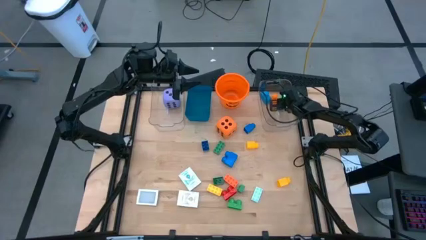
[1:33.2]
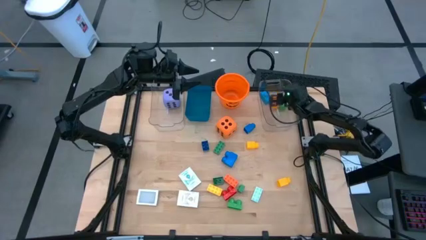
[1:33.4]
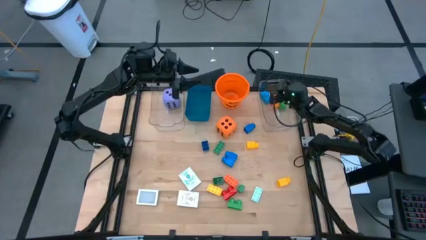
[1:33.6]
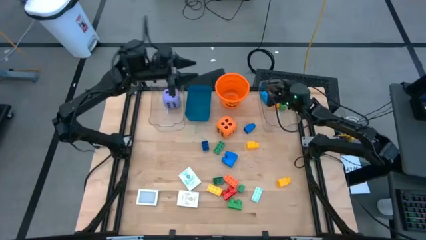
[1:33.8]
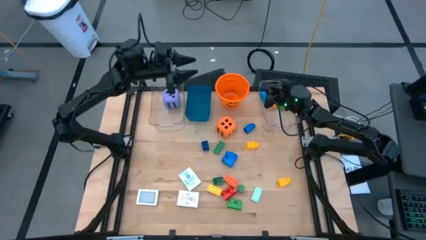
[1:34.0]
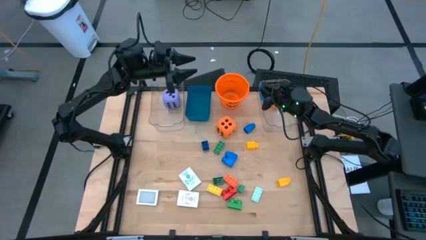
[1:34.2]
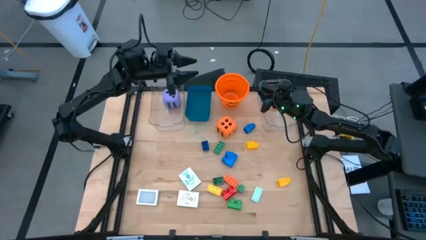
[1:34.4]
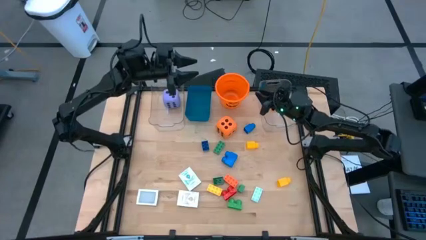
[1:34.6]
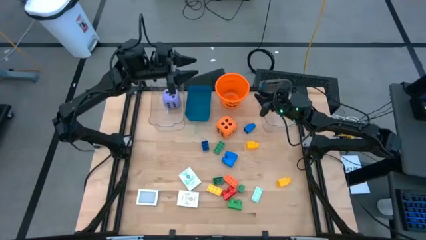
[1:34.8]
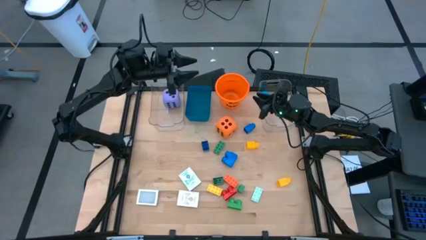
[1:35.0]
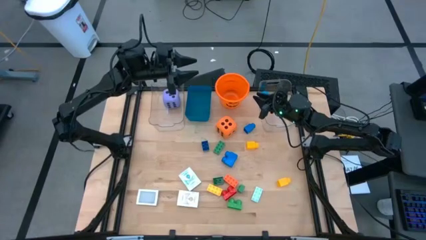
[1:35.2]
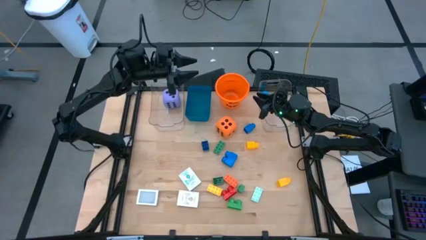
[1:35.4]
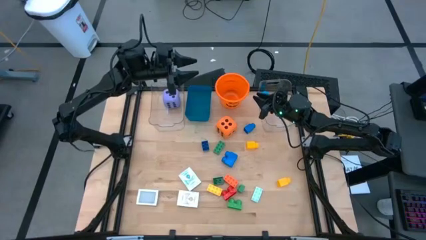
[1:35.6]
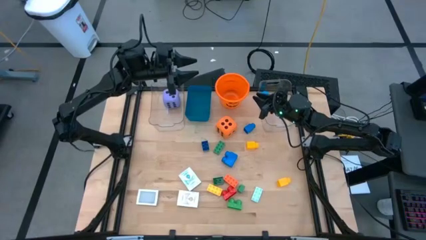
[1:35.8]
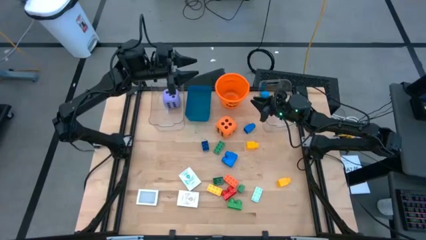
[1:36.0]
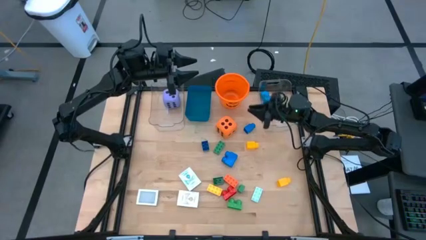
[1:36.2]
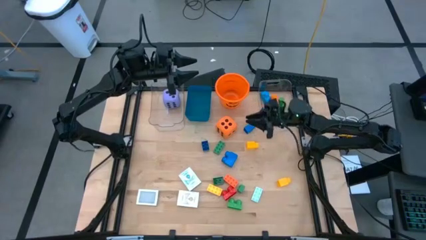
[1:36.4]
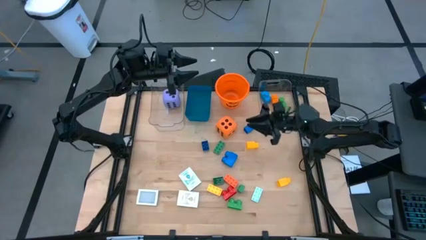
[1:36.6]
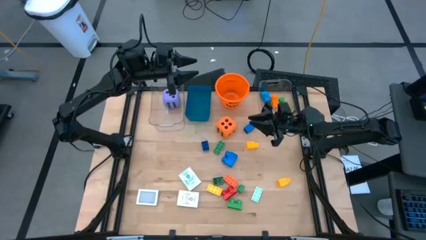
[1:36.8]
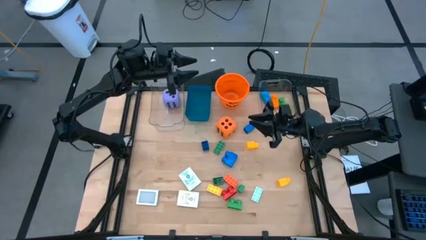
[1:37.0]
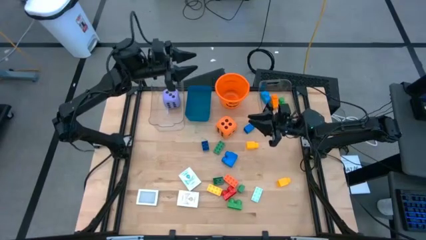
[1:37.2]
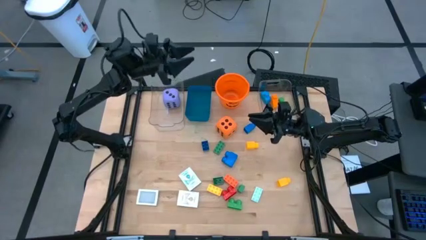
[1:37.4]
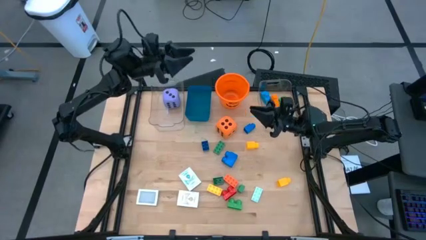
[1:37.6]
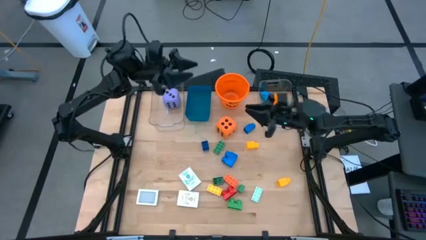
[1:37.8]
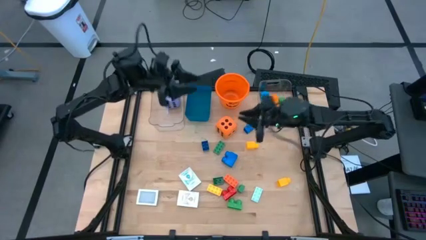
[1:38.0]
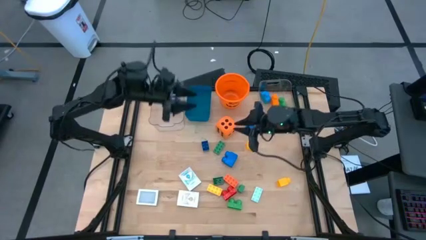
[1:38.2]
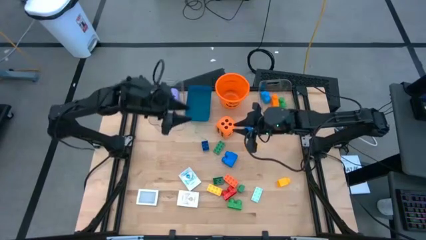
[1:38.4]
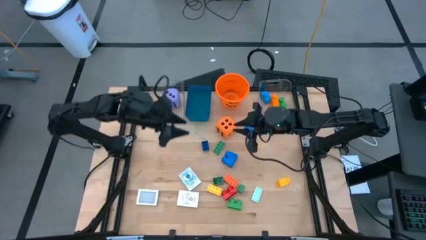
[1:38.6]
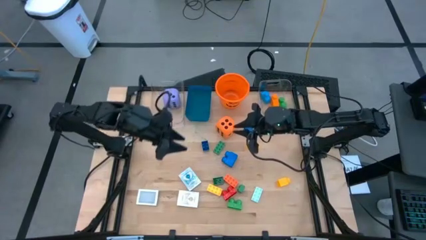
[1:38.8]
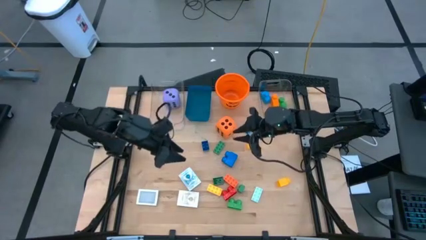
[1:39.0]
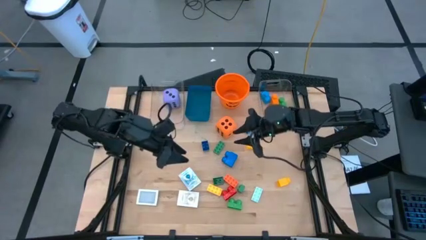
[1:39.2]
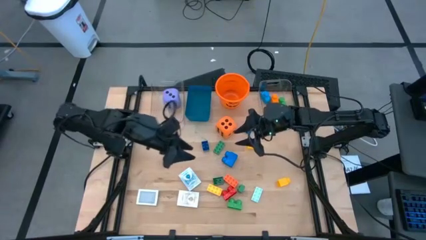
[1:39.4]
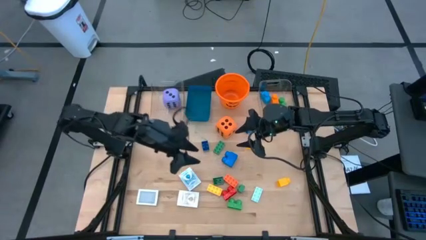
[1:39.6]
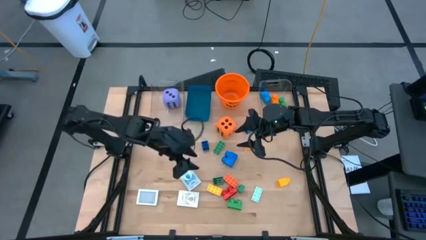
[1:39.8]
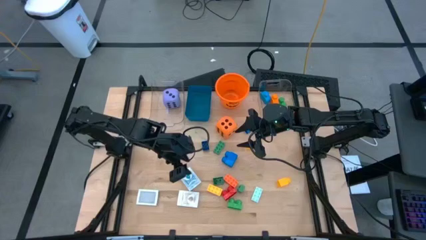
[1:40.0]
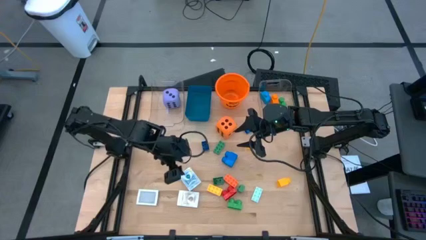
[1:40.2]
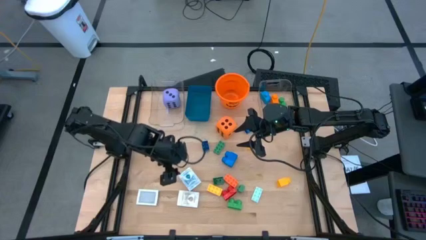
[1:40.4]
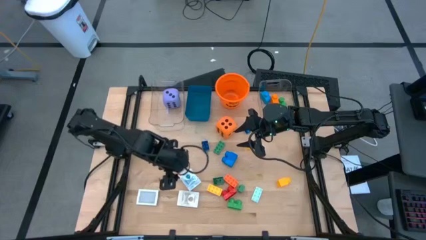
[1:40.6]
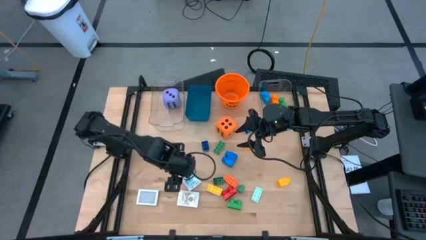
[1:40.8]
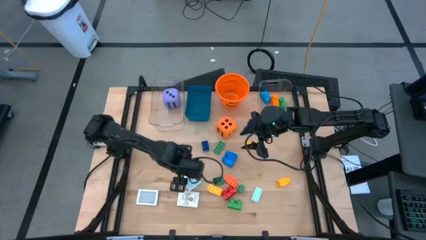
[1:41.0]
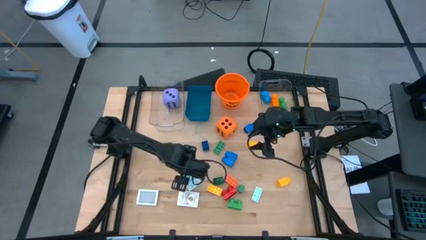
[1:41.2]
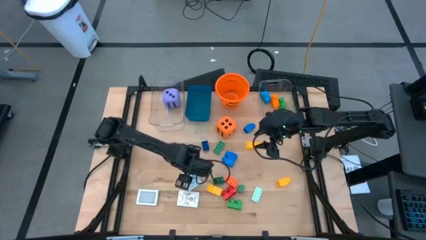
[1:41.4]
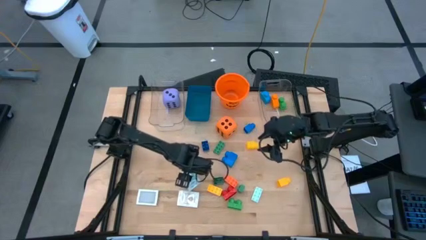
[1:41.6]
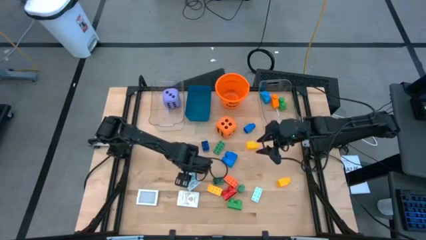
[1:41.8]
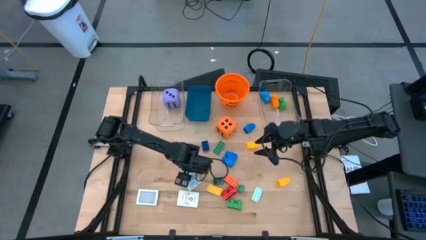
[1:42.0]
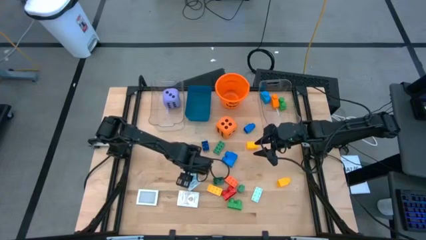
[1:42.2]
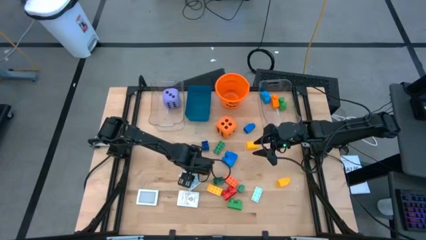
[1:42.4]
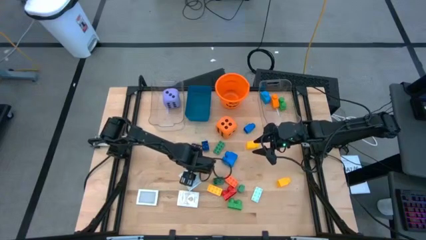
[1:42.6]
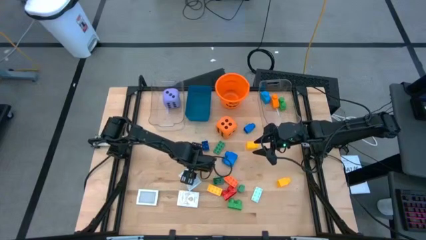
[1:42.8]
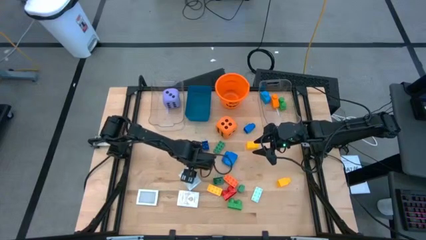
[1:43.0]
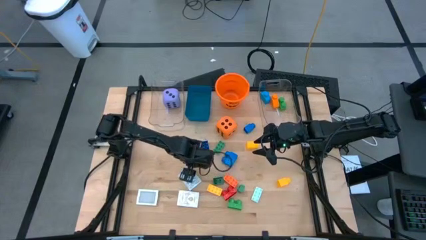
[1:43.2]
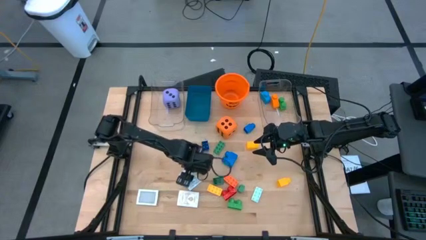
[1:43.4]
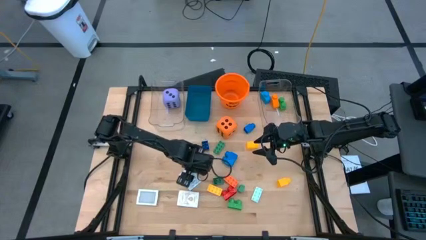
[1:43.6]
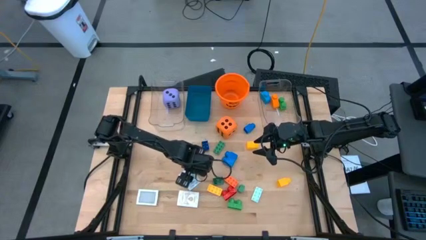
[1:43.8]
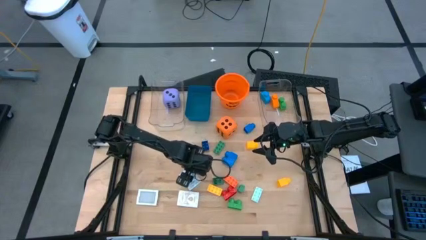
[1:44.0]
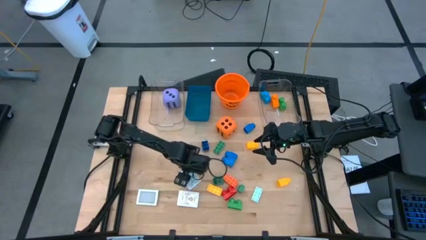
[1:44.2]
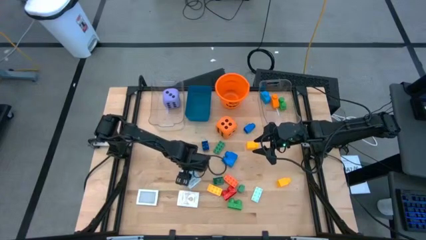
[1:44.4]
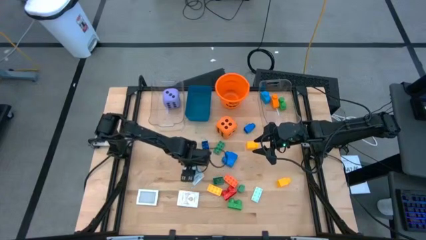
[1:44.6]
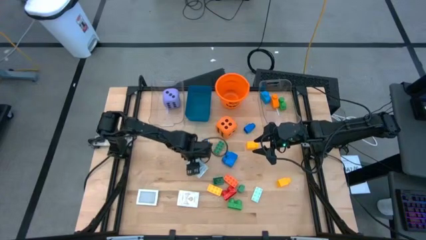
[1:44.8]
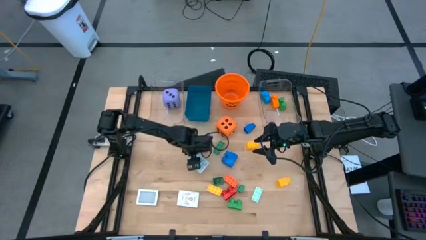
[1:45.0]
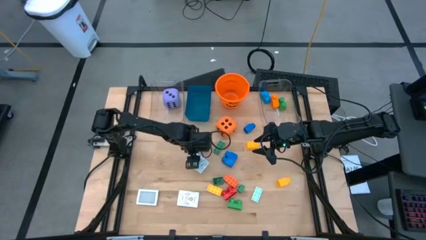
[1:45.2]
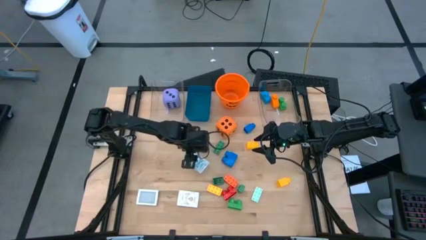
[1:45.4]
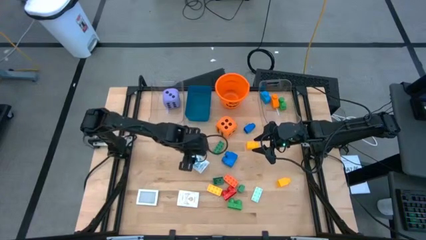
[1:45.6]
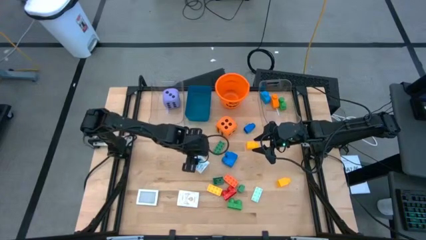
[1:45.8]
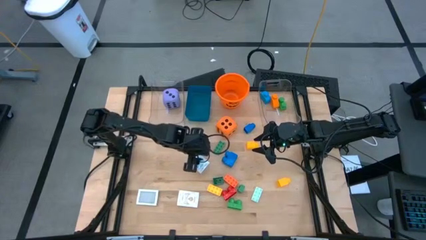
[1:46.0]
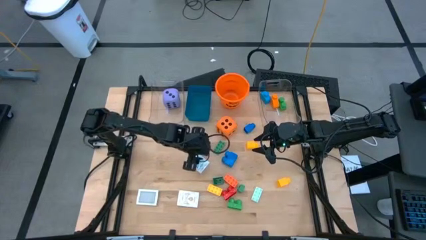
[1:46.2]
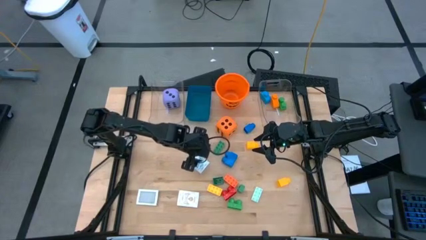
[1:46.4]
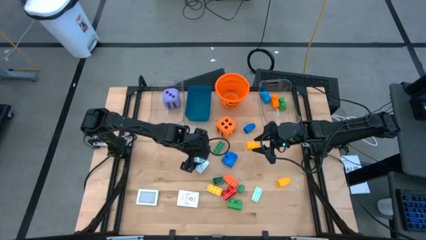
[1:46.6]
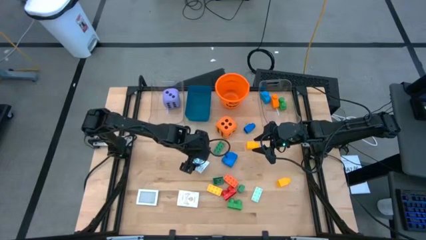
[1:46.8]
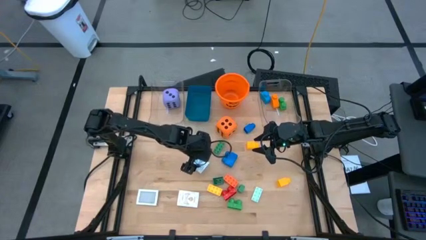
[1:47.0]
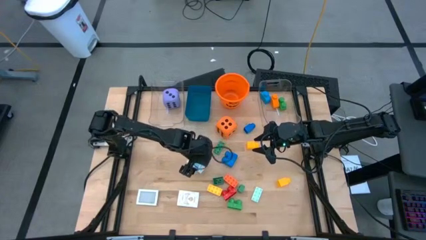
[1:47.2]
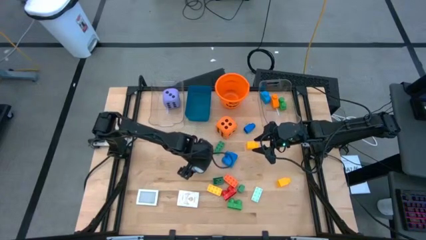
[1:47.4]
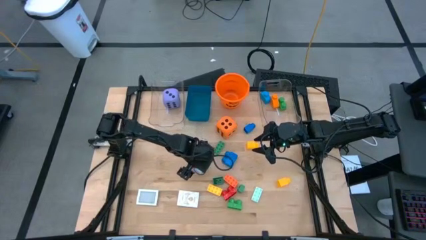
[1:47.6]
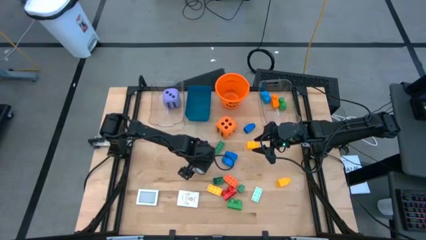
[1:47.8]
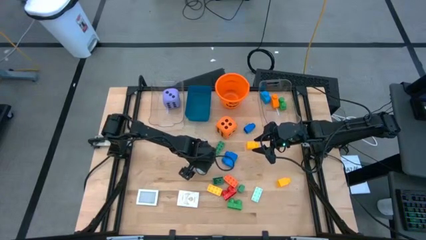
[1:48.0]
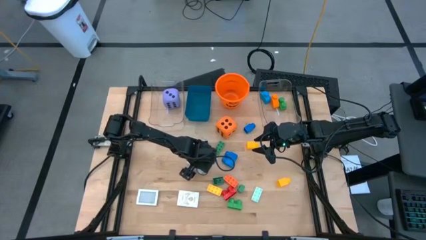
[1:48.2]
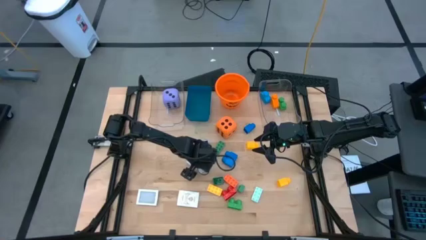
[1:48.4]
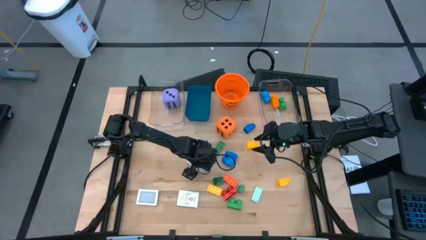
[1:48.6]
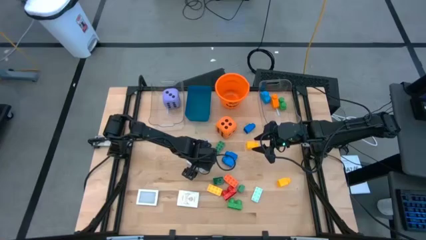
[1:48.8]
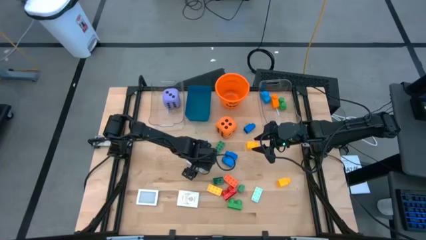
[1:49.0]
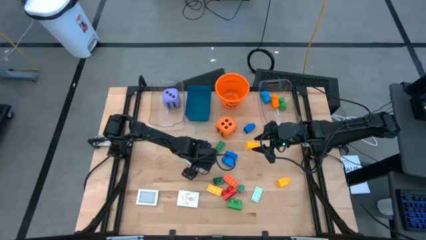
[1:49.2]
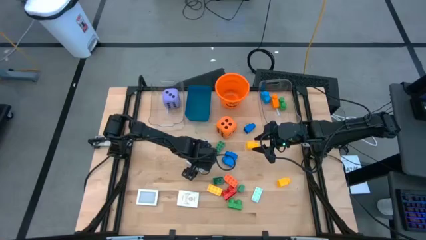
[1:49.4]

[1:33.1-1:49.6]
Task: Pick & Place Toys
Put the blue deck of cards into the blue bin
